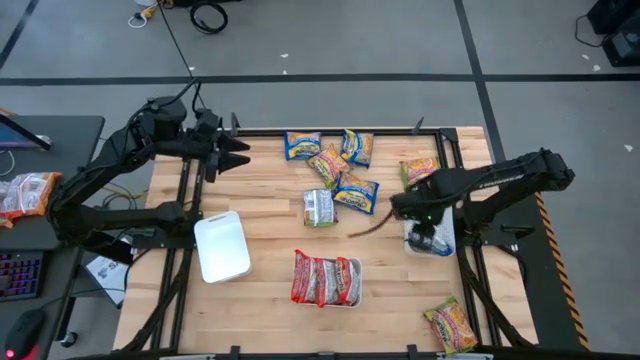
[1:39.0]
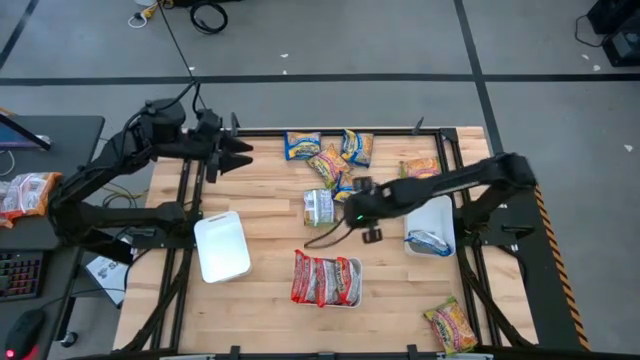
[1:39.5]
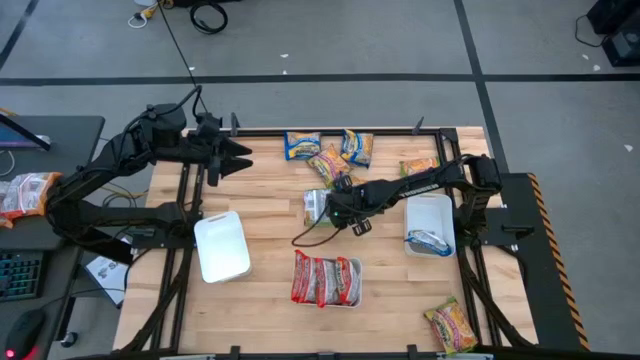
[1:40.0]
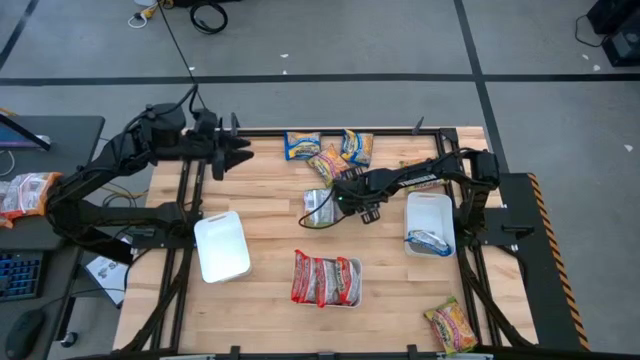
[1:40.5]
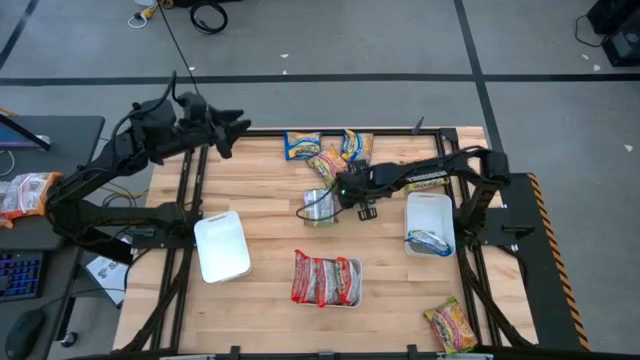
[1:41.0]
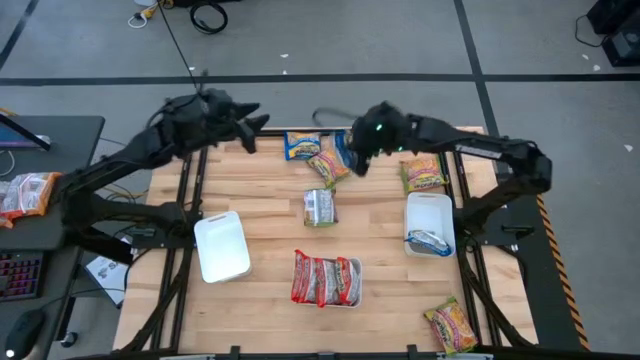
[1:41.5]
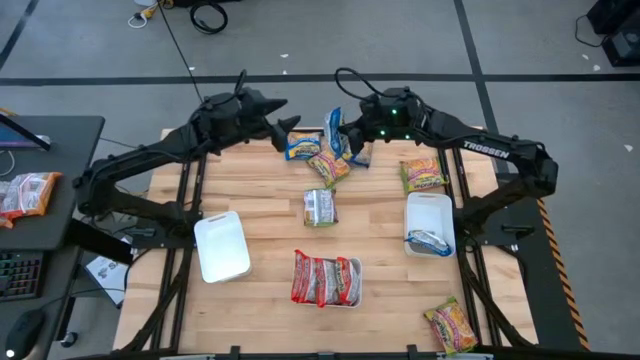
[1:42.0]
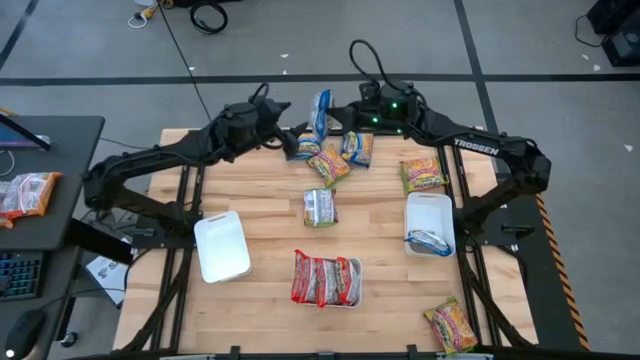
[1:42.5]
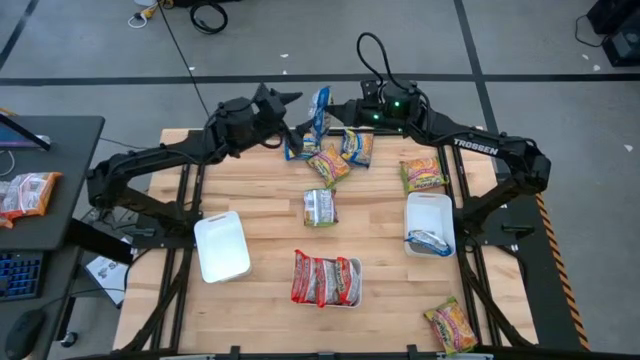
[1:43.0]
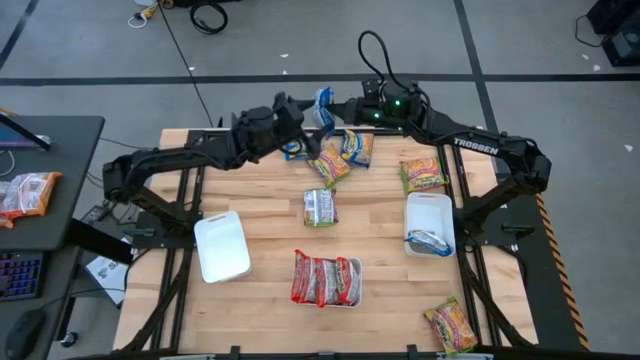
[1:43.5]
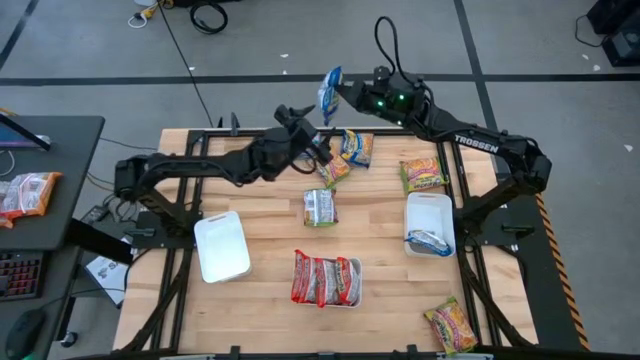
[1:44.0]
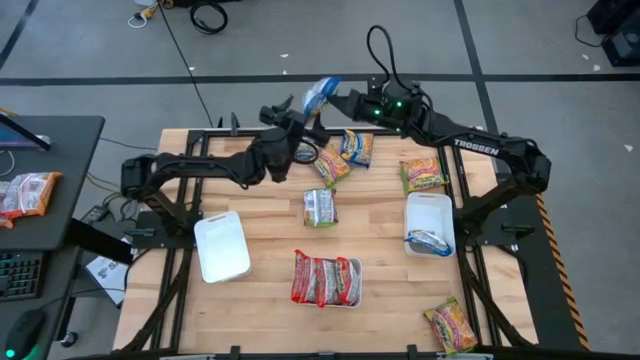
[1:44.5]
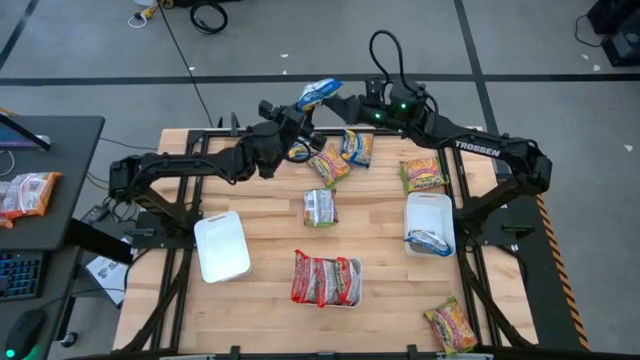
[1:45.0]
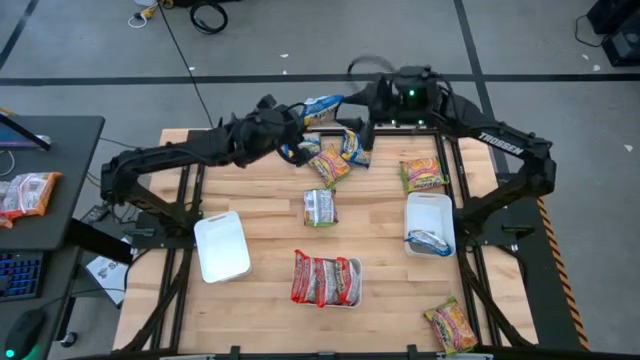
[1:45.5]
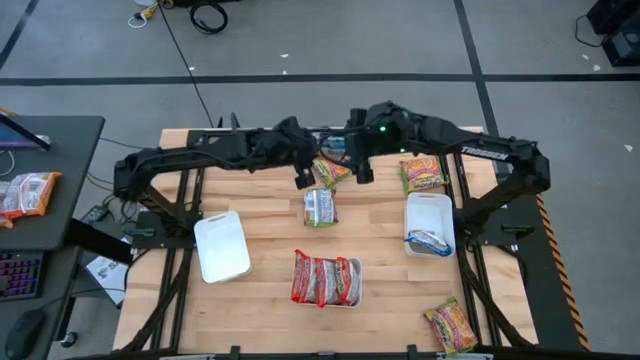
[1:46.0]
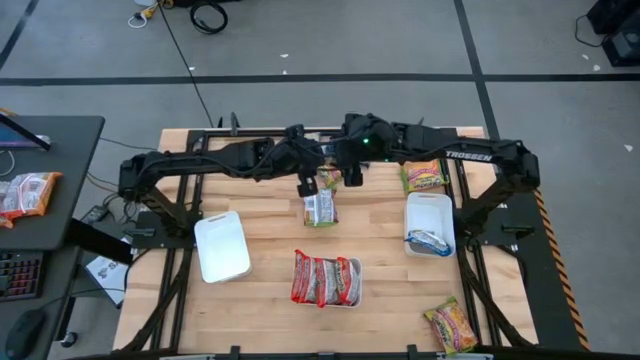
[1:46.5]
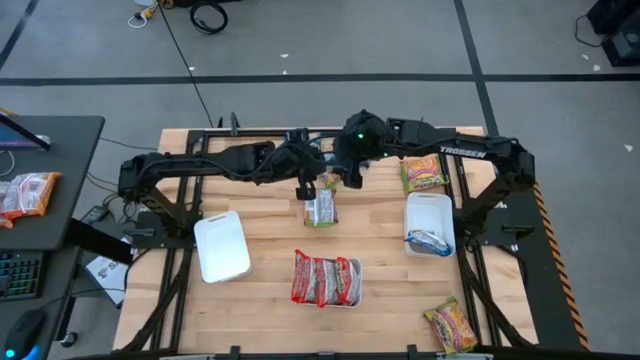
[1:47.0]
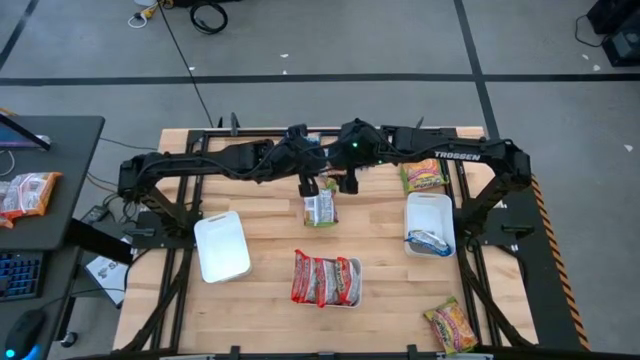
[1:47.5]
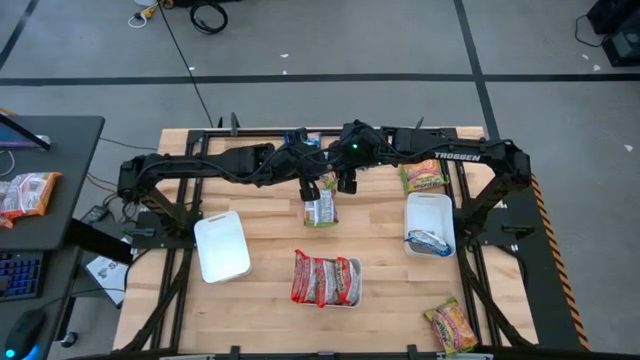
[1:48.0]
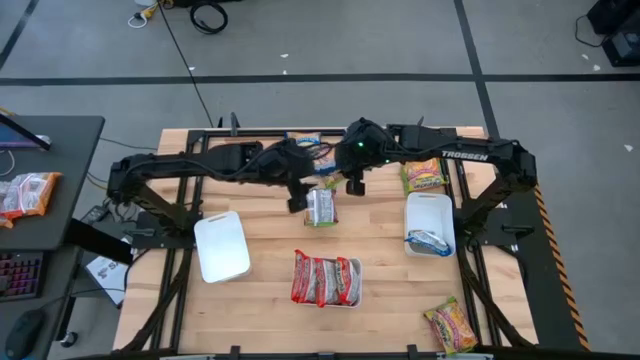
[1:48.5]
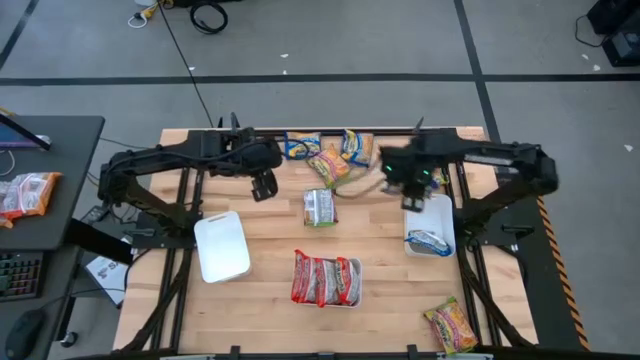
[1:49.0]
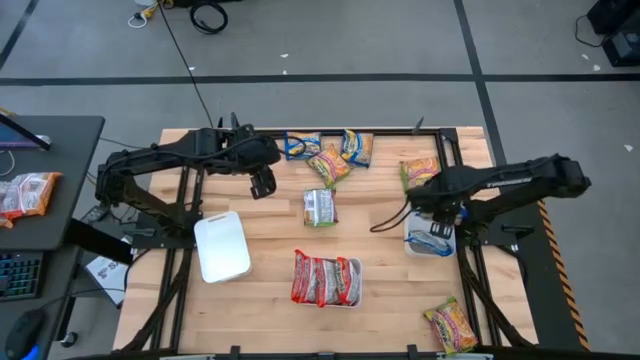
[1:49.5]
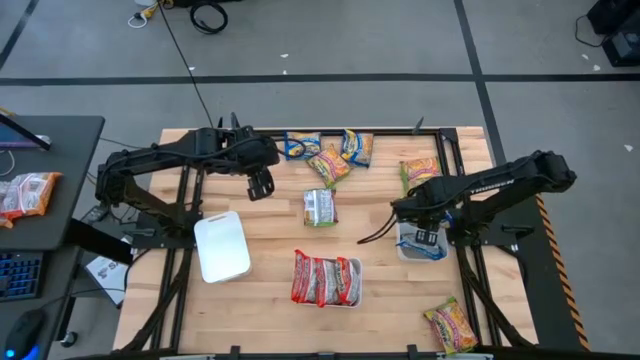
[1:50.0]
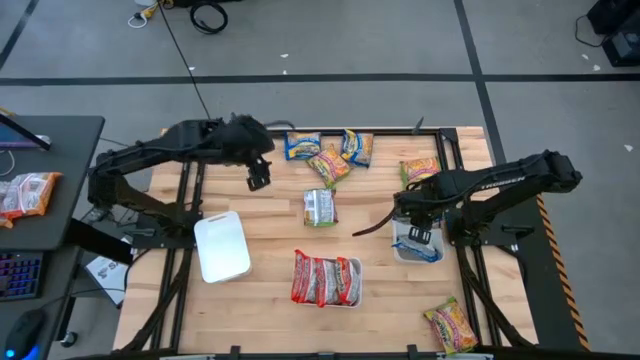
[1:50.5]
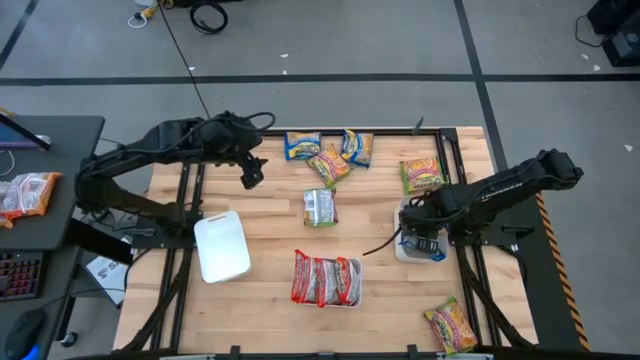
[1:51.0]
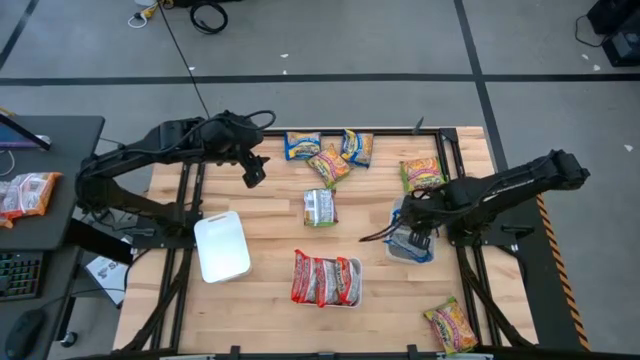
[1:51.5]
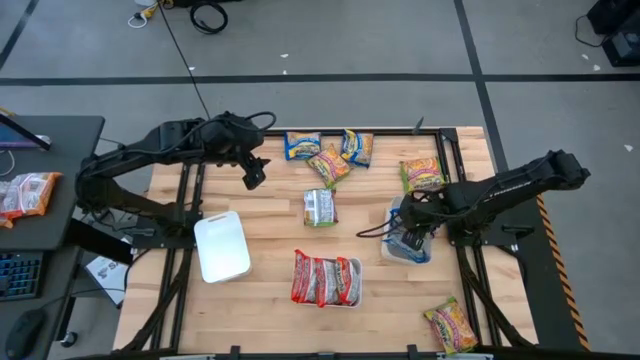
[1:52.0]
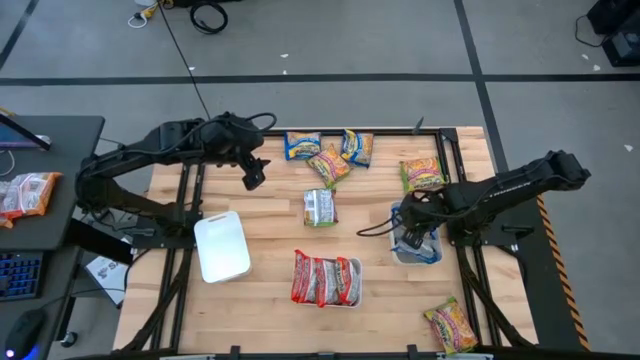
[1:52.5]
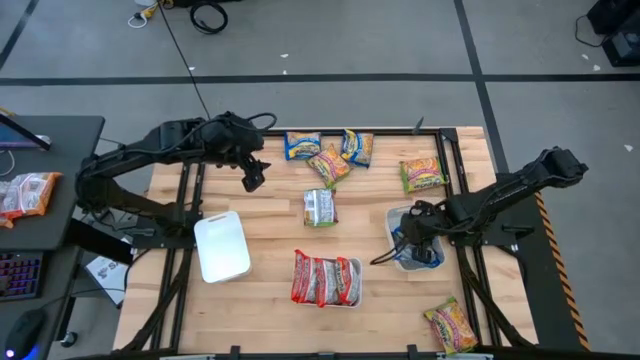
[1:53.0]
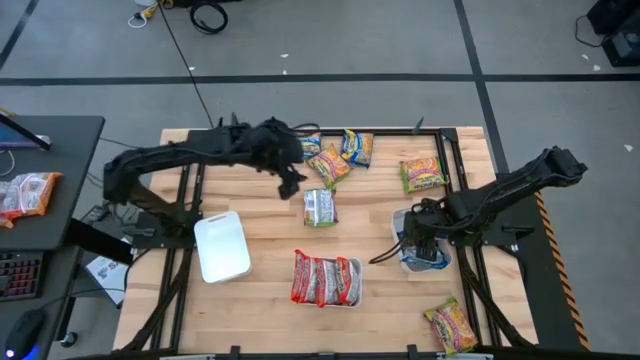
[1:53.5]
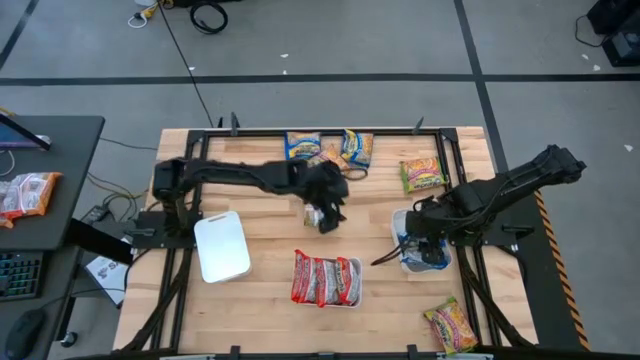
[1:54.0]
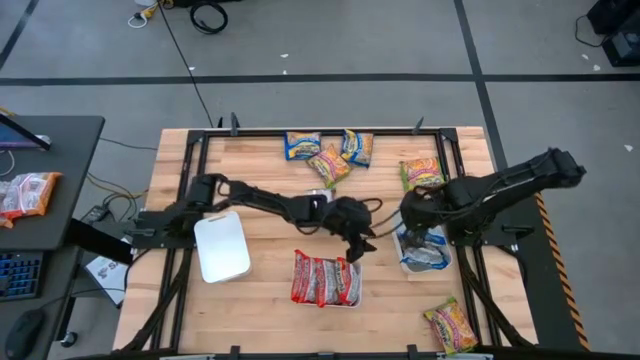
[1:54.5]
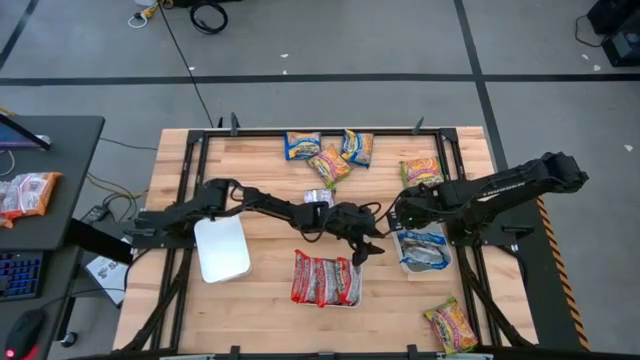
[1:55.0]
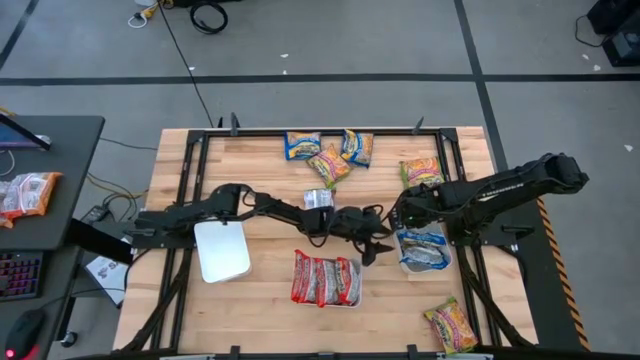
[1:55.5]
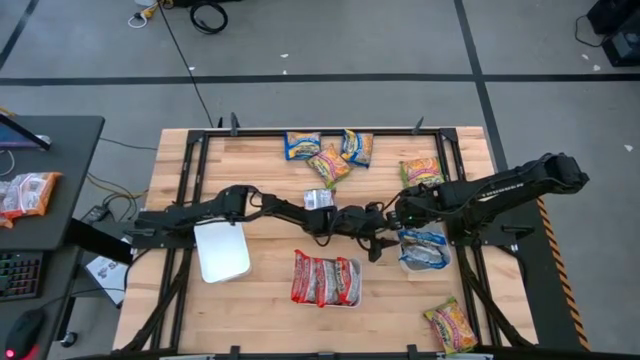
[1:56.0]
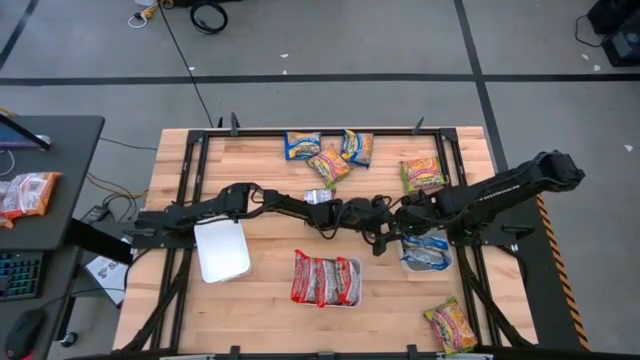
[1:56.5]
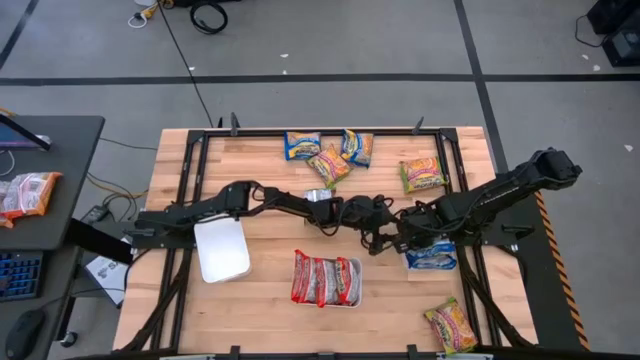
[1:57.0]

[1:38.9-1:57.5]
Task: Sort Maruchan noodles
Put the bottom blue noodle pack into the right white bin

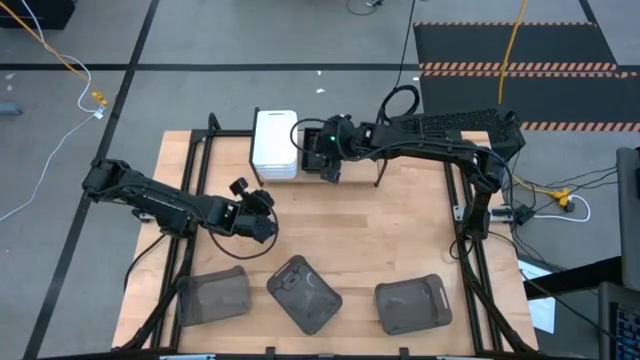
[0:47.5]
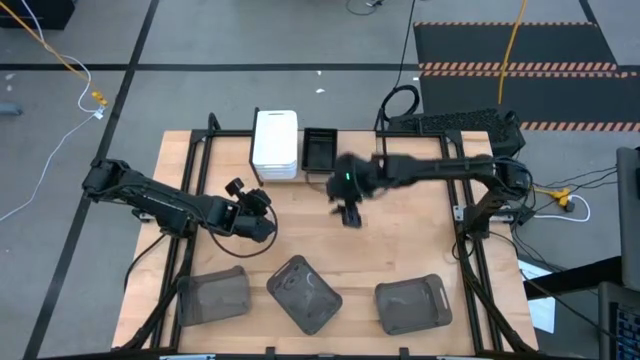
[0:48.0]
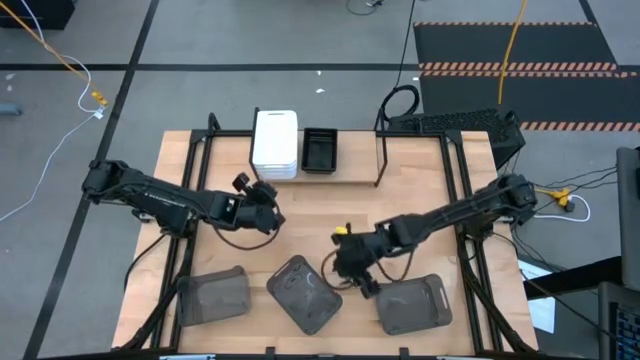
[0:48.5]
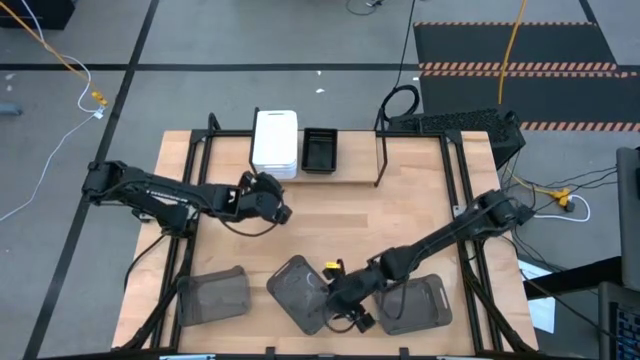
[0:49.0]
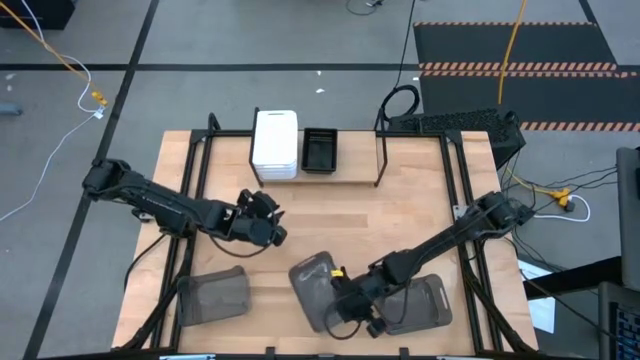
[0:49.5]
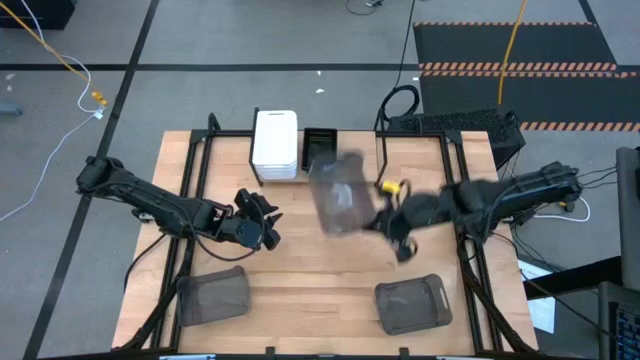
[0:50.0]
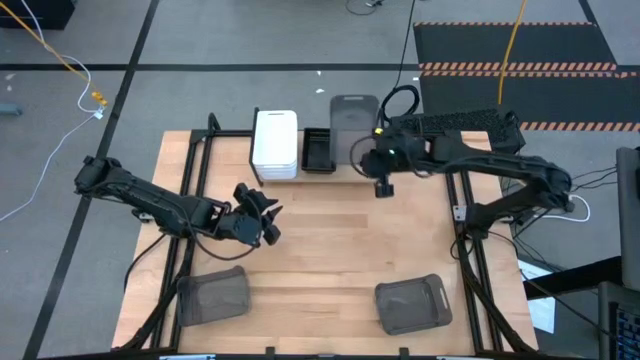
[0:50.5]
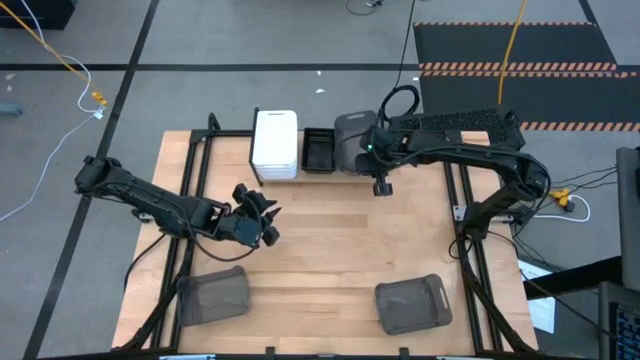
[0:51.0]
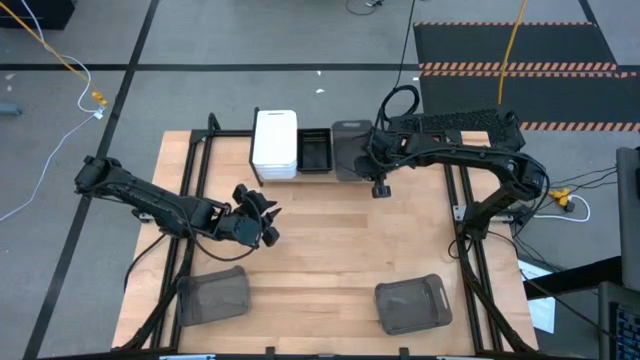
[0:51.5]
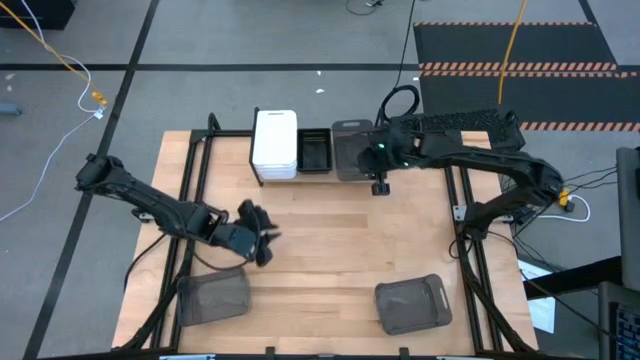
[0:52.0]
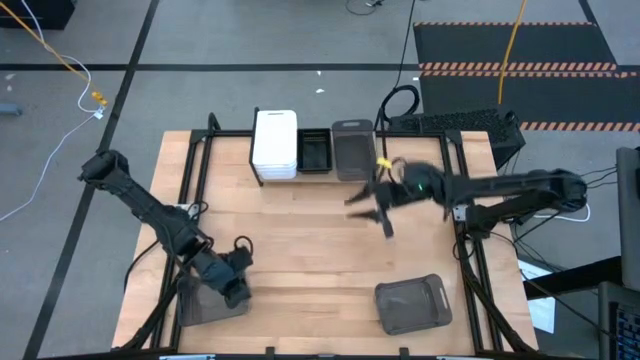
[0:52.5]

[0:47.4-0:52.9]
Task: Stack baskets on shelf by color
Put the center gray bin on the shelf
